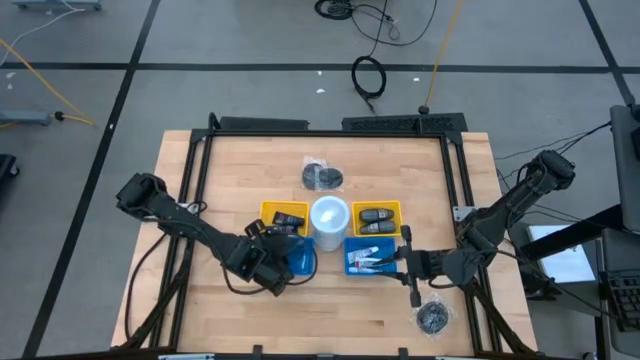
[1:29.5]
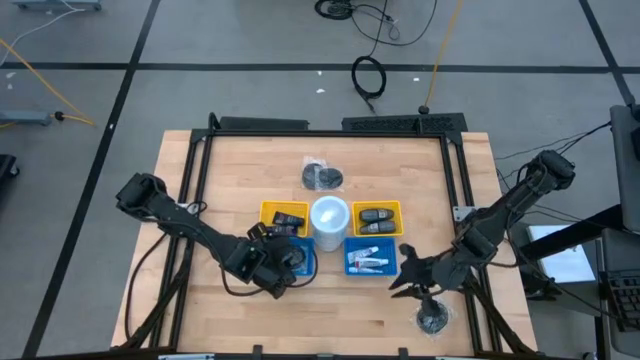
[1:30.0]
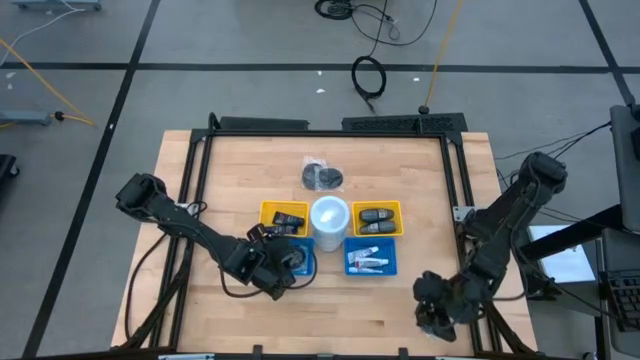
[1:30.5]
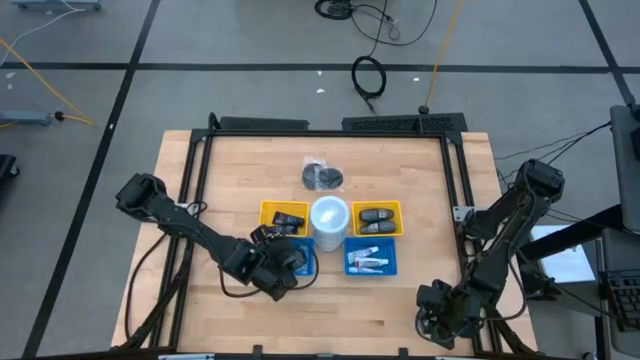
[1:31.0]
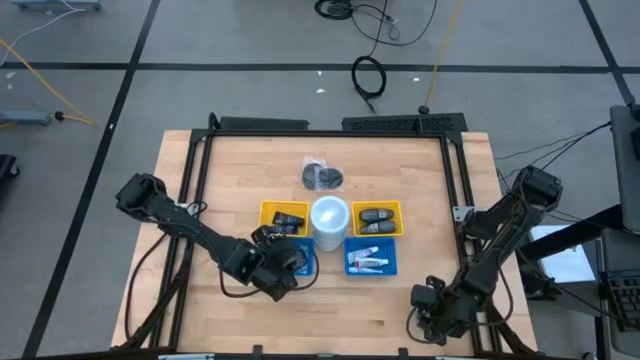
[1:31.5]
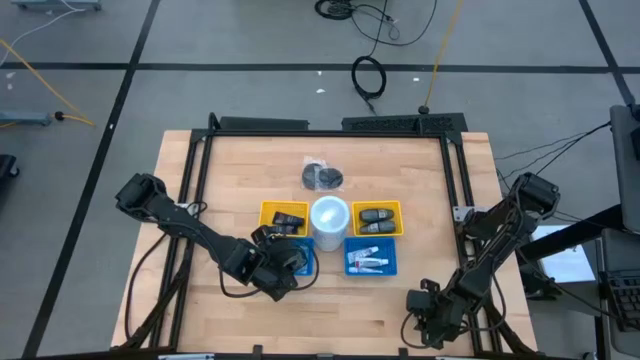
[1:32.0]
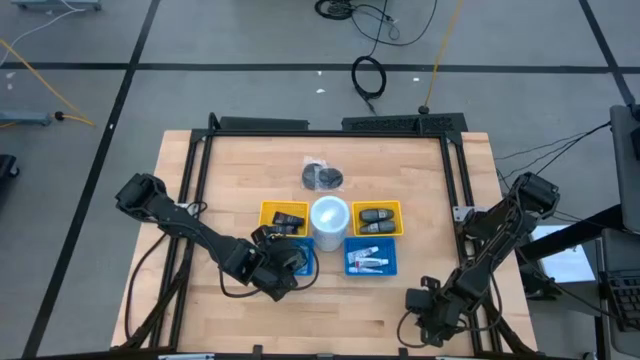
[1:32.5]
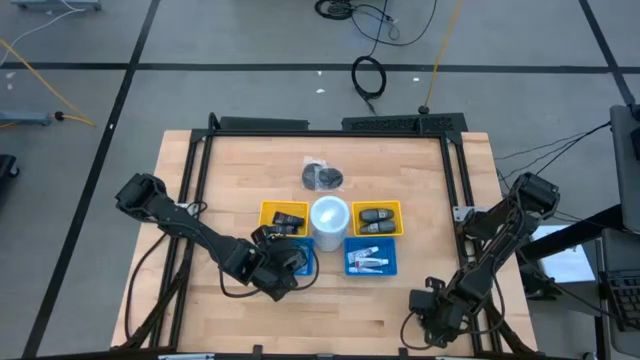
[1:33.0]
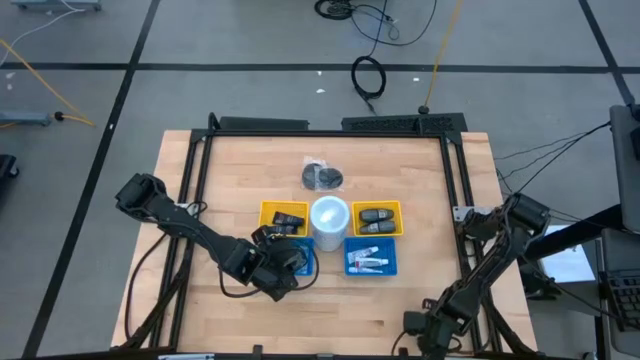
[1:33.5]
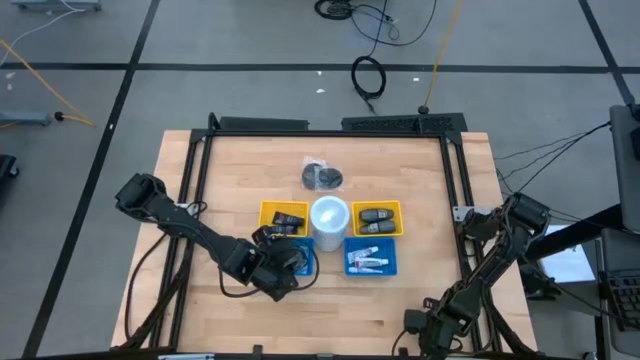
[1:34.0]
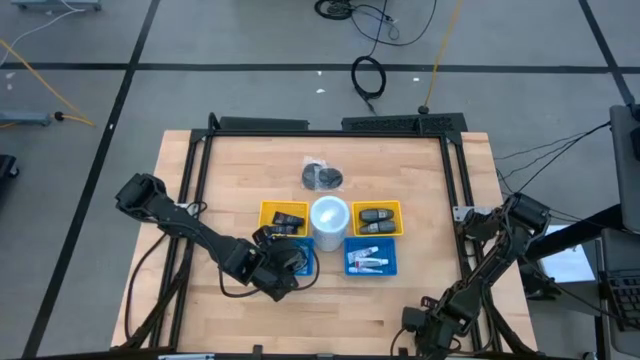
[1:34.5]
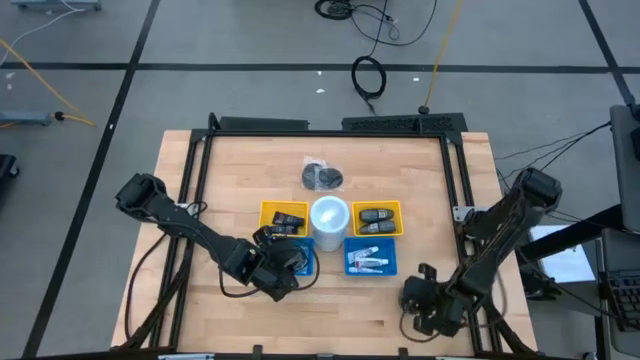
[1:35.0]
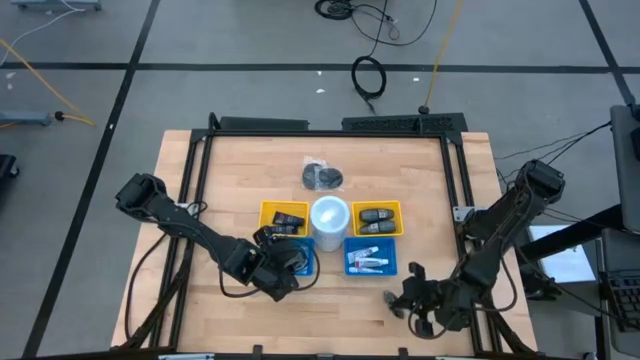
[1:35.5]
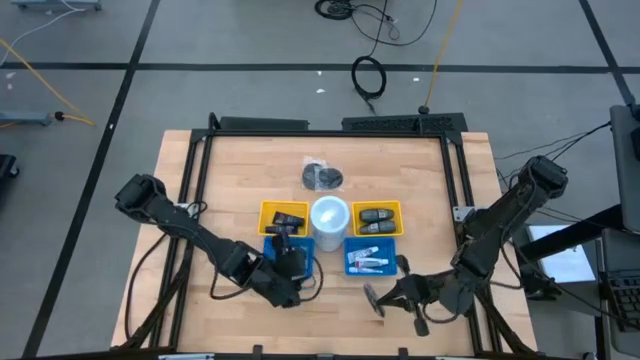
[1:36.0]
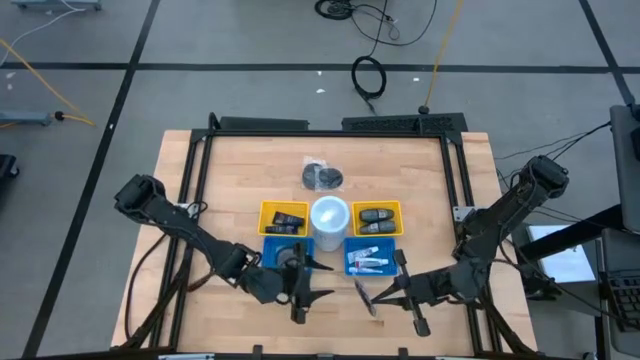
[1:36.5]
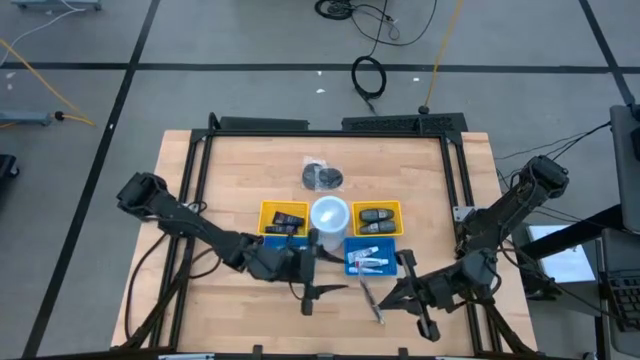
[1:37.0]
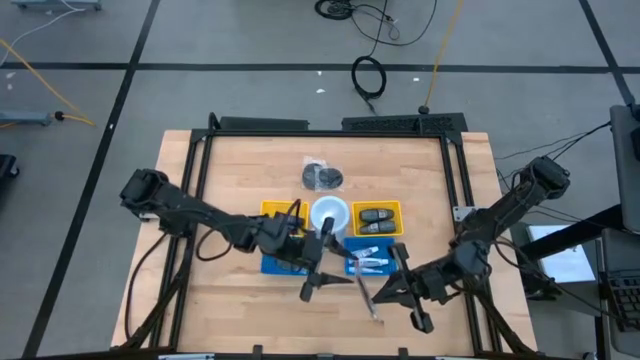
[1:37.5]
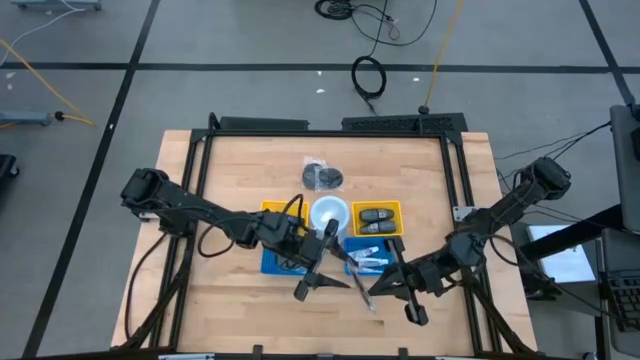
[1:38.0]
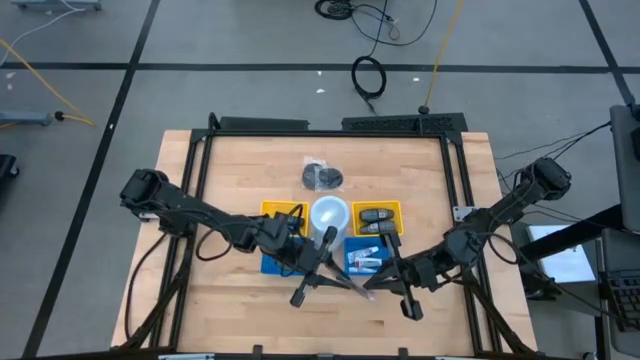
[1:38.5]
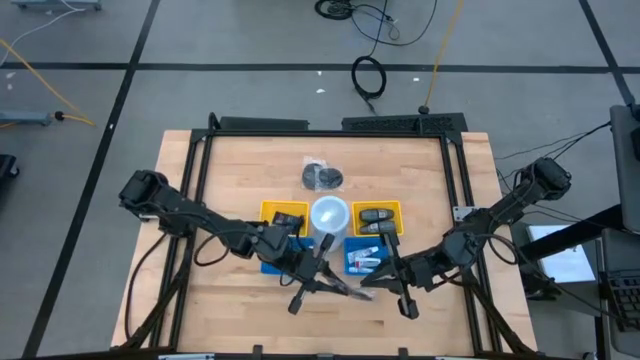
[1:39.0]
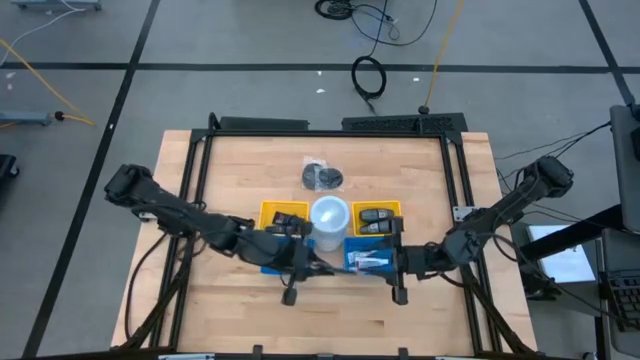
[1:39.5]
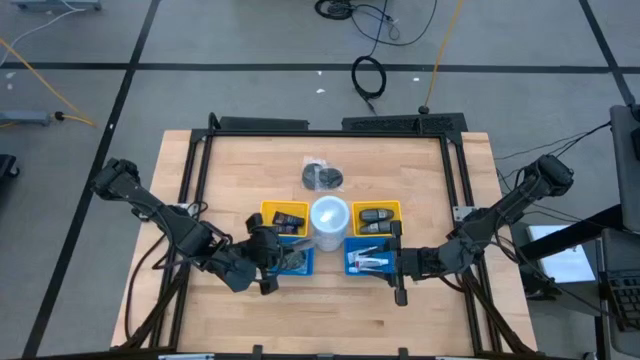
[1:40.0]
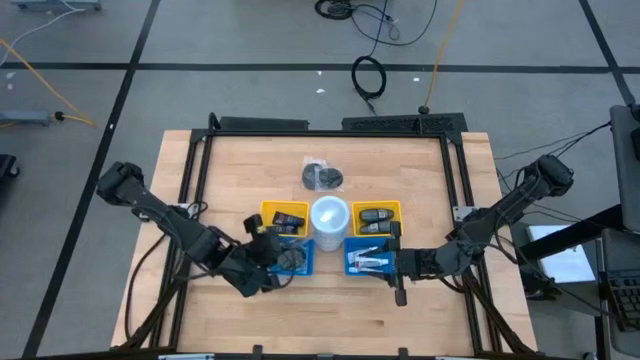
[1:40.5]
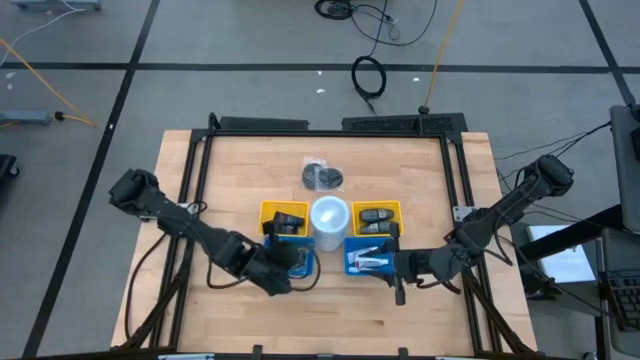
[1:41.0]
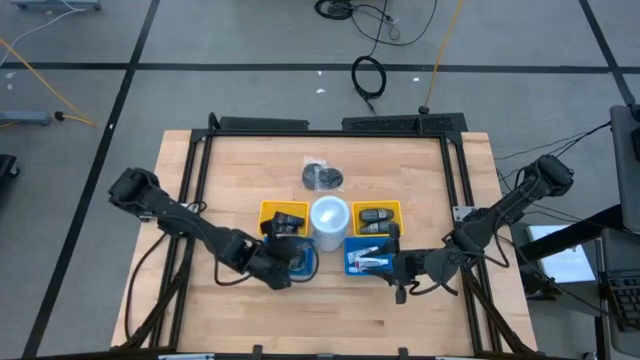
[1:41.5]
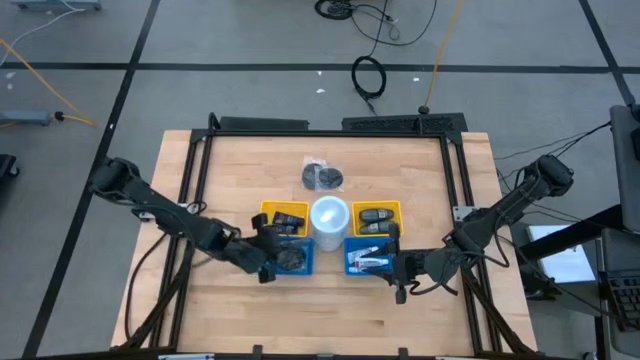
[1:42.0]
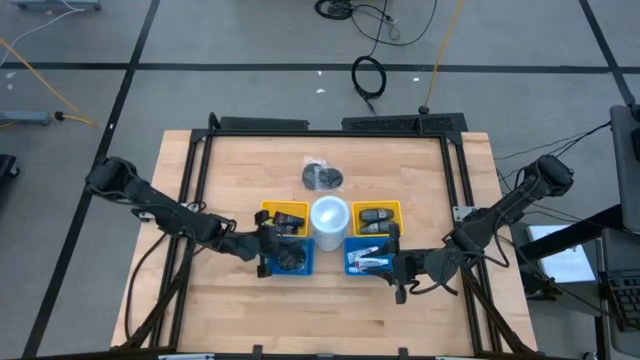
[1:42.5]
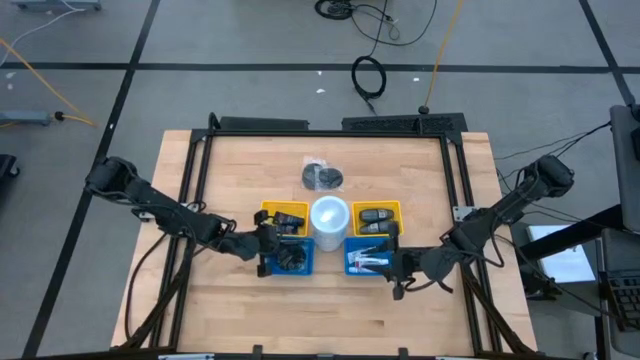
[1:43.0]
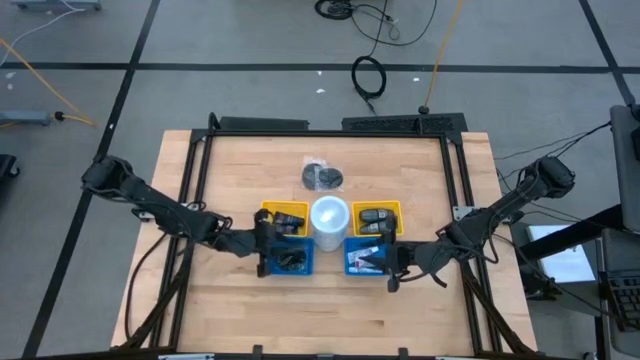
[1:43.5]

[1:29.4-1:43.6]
Task: Pick & Place Travel size toiletries
Put the hairbrush into the left blue bin

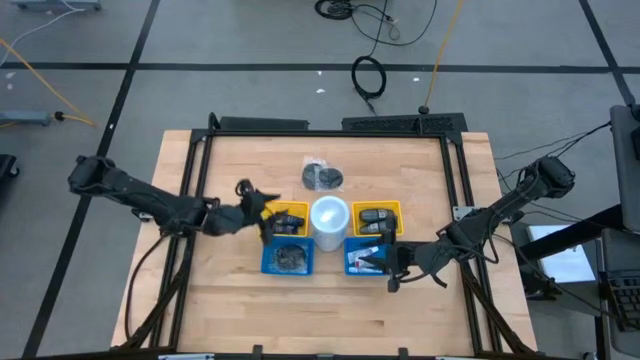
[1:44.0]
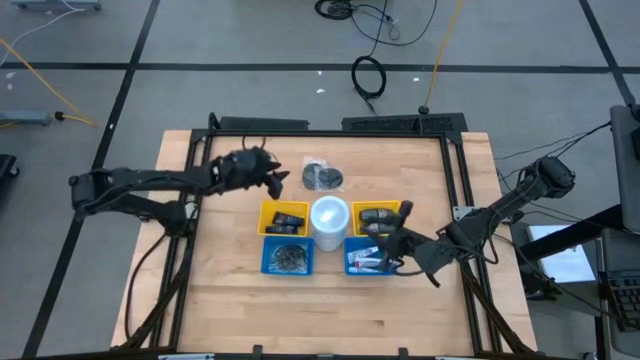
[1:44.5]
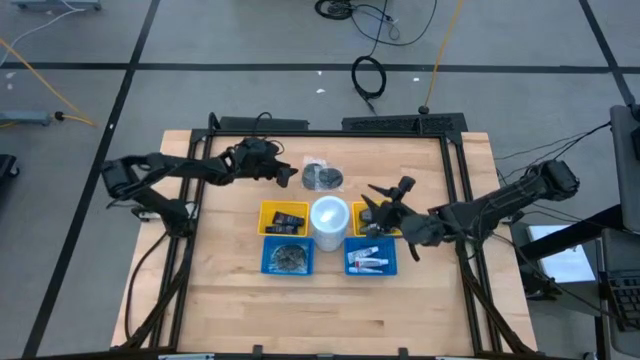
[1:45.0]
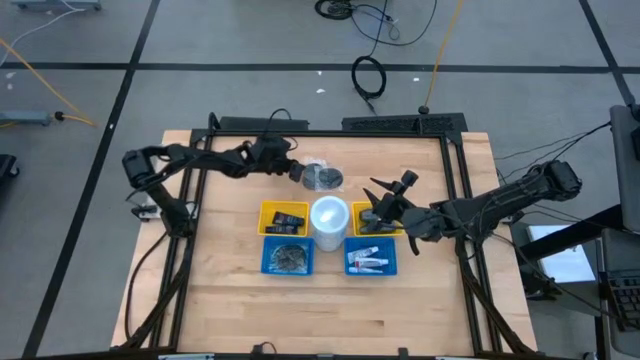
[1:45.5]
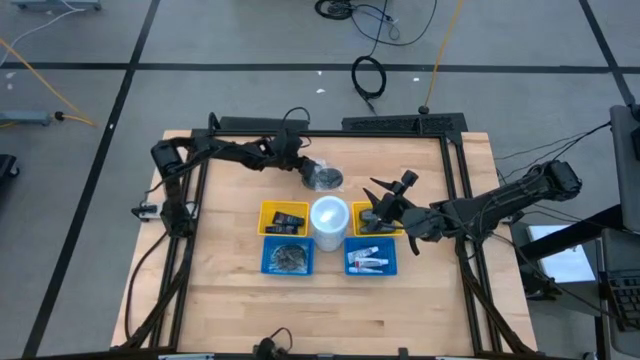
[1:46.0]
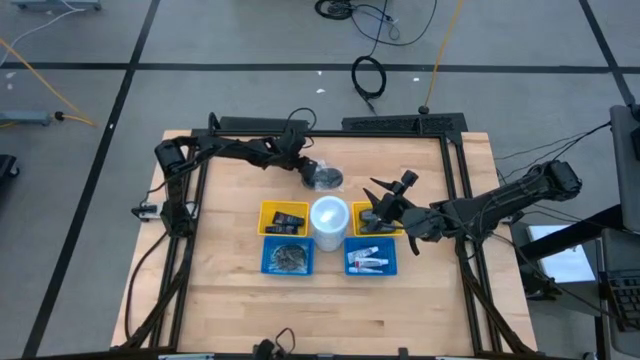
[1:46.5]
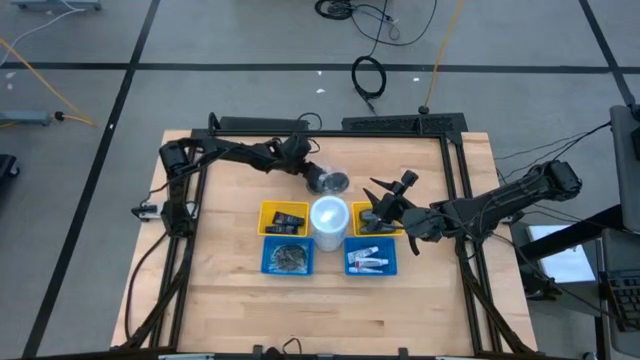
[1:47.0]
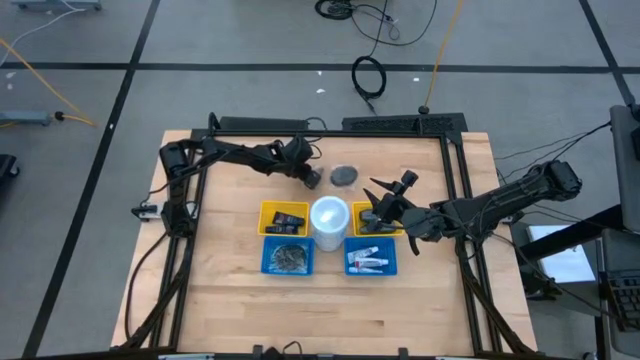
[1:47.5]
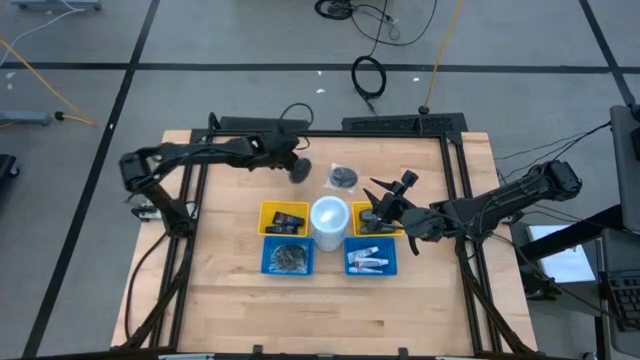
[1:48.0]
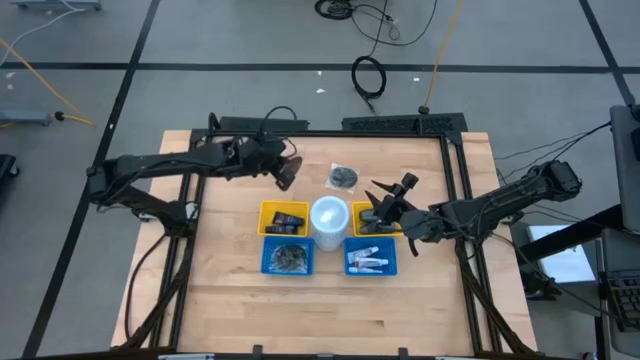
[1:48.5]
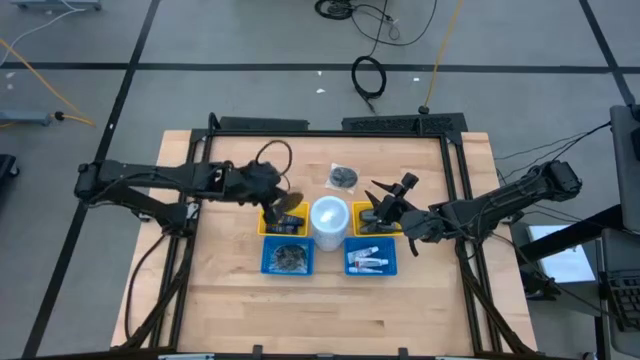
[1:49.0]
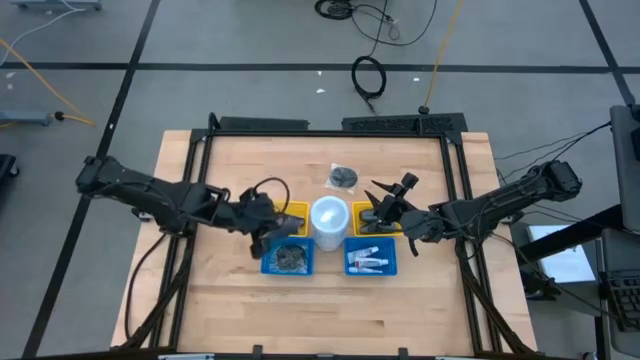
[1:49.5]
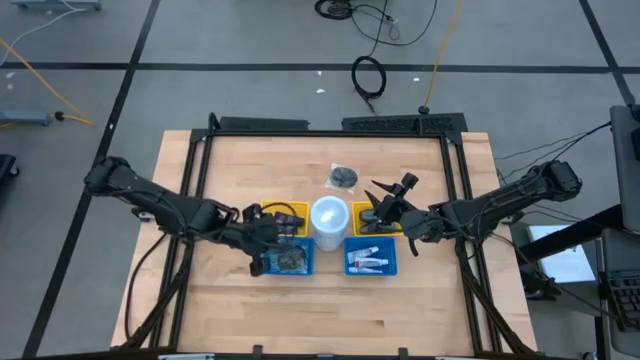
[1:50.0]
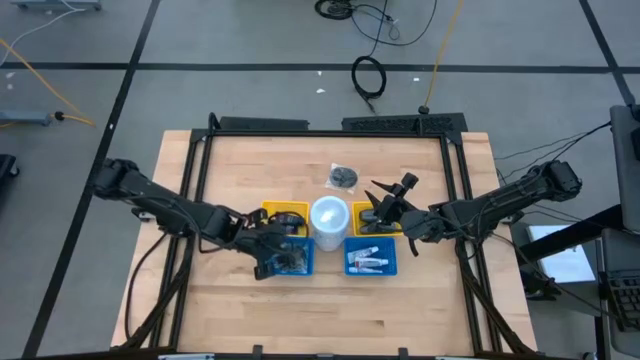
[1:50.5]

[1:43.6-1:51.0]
Put the hairbrush into the left blue bin

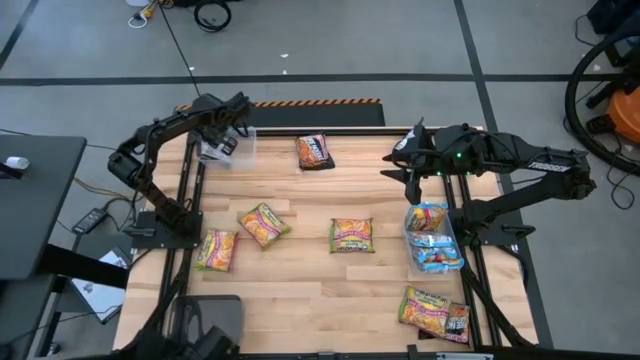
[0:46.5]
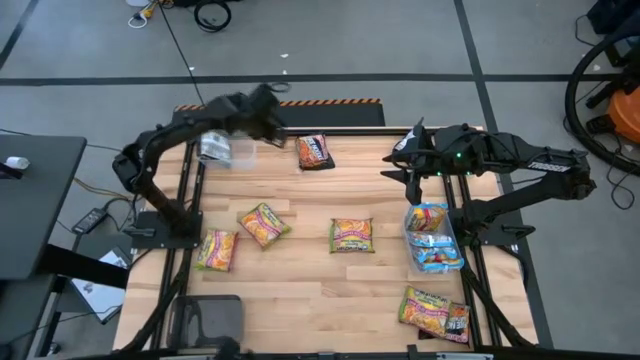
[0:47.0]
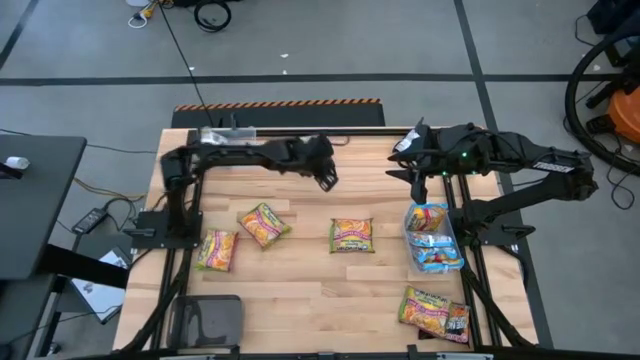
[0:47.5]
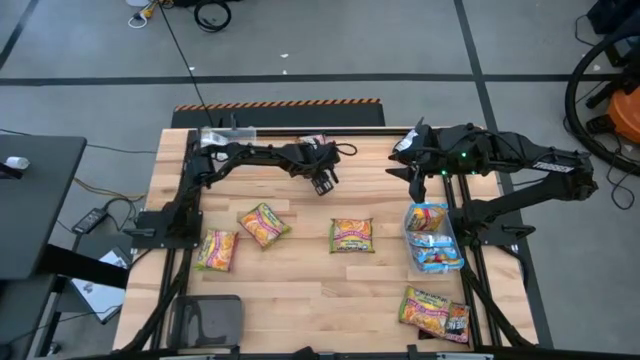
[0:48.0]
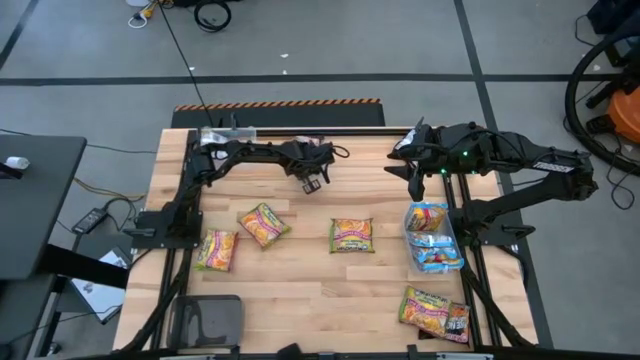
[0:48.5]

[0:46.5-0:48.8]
Task: Sort Maruchan noodles
Put the black noodle pack into the top transparent bin
